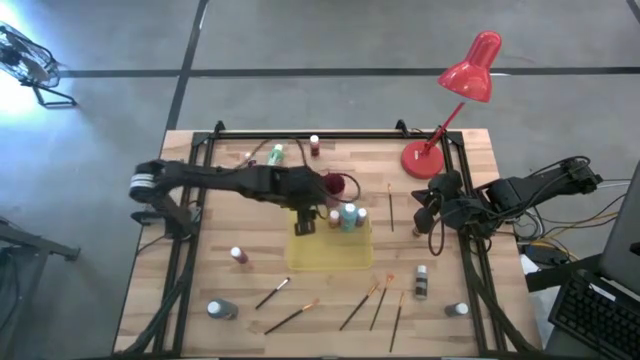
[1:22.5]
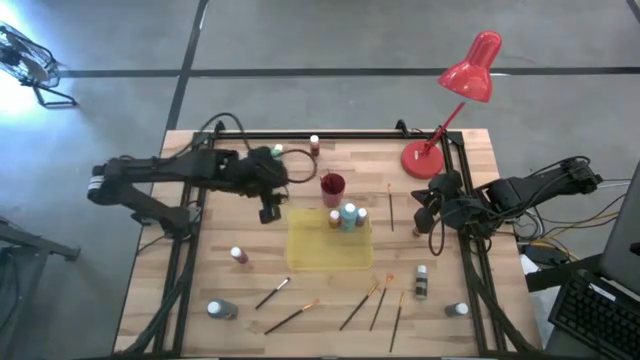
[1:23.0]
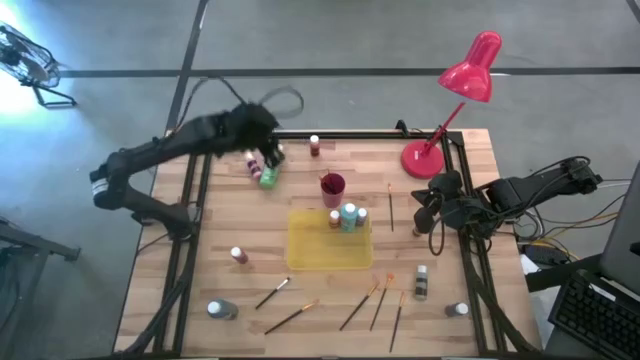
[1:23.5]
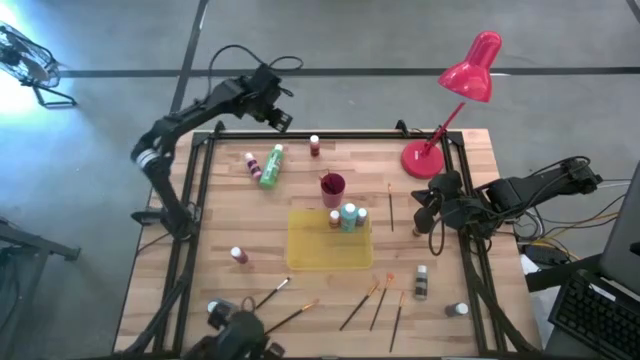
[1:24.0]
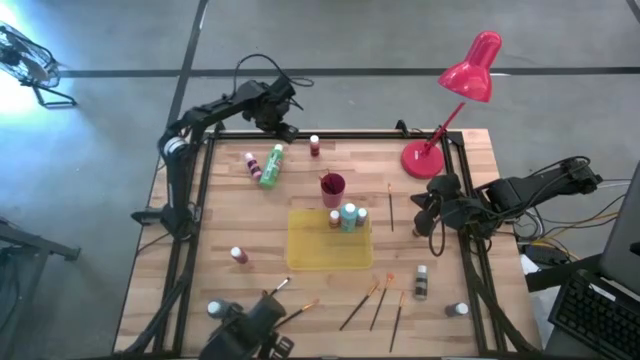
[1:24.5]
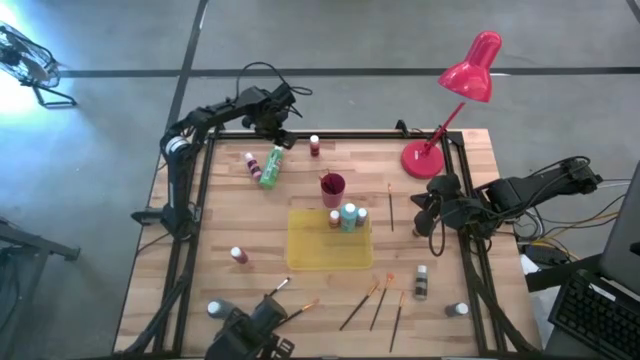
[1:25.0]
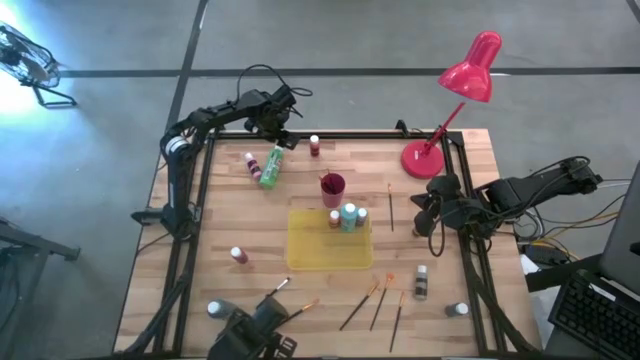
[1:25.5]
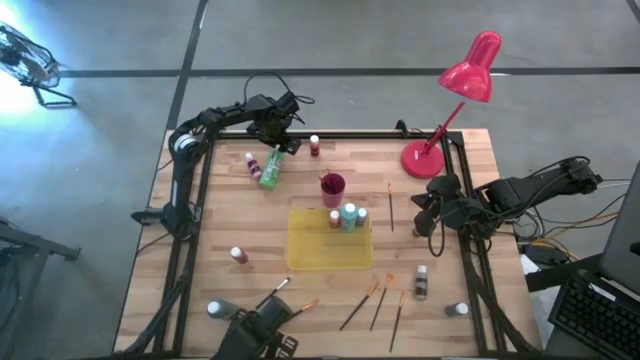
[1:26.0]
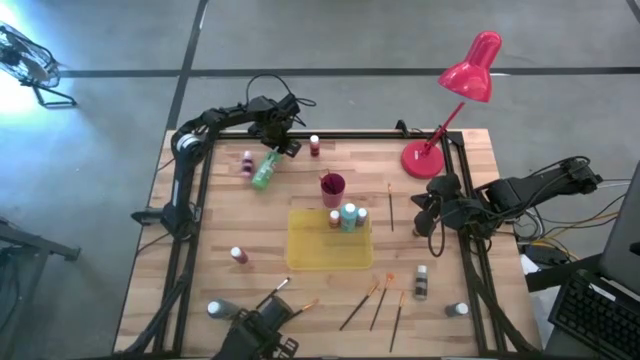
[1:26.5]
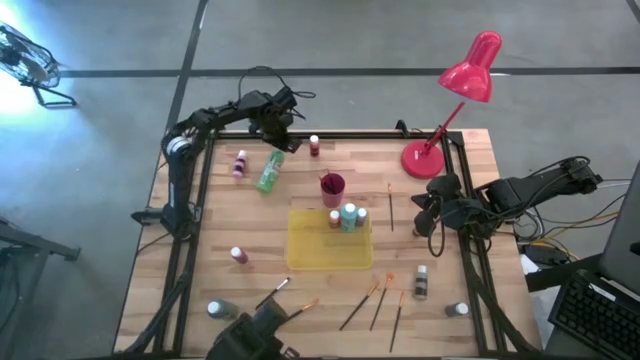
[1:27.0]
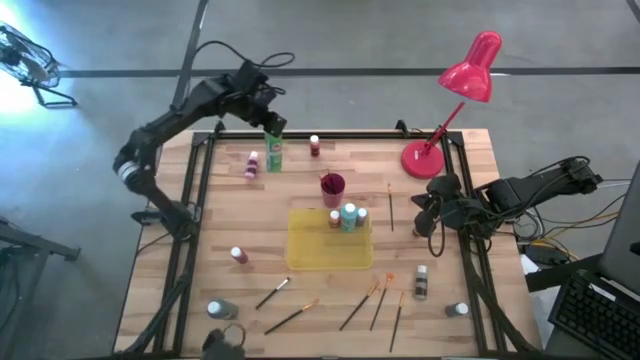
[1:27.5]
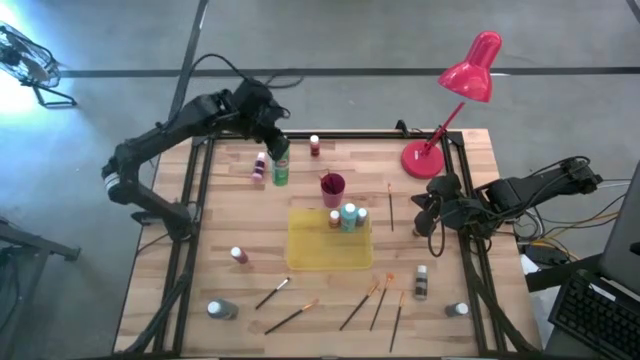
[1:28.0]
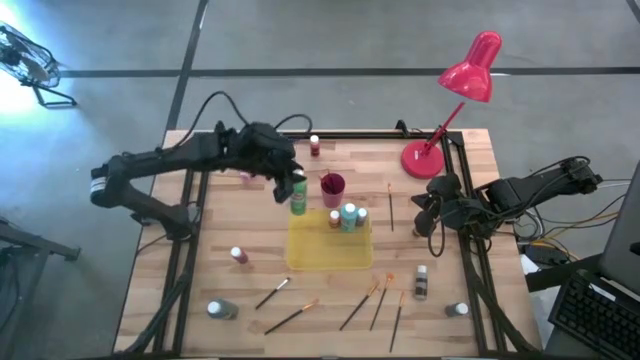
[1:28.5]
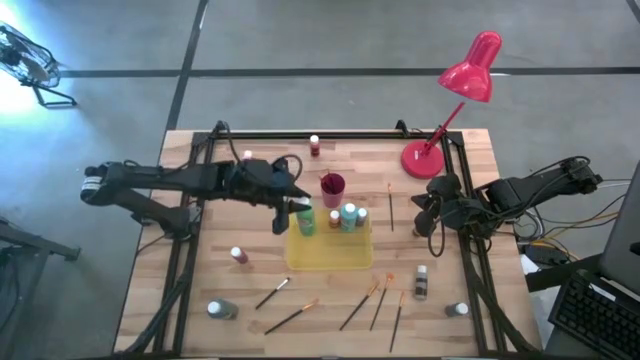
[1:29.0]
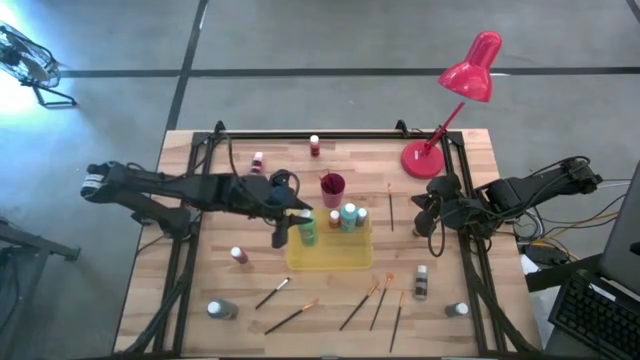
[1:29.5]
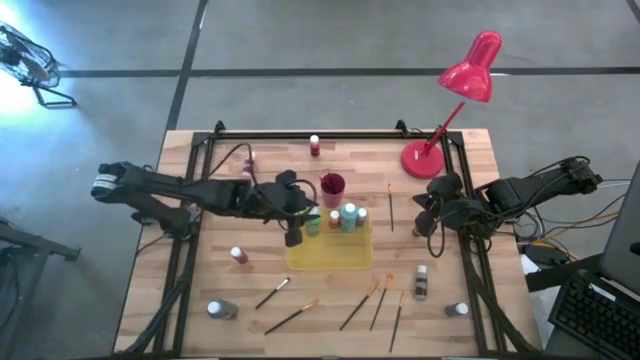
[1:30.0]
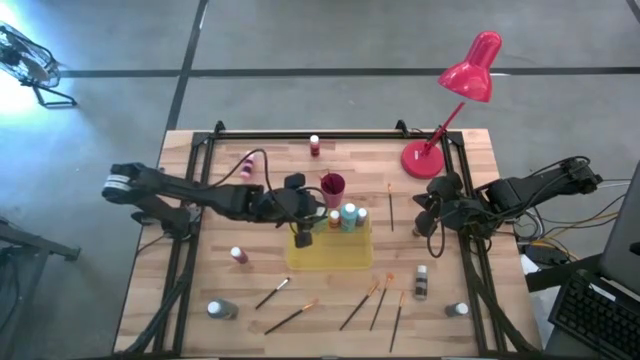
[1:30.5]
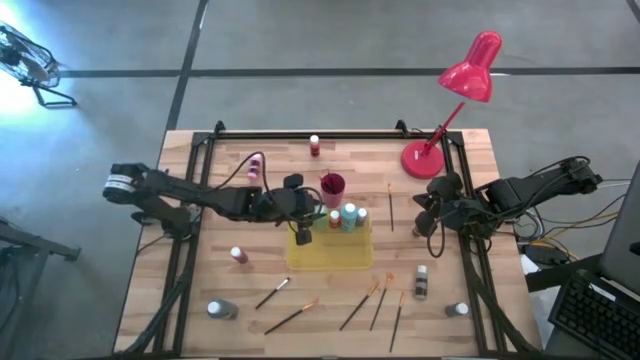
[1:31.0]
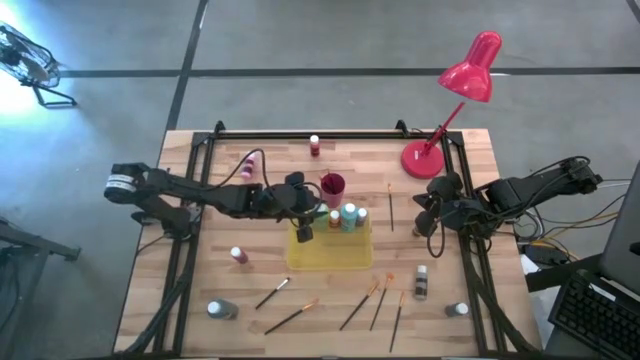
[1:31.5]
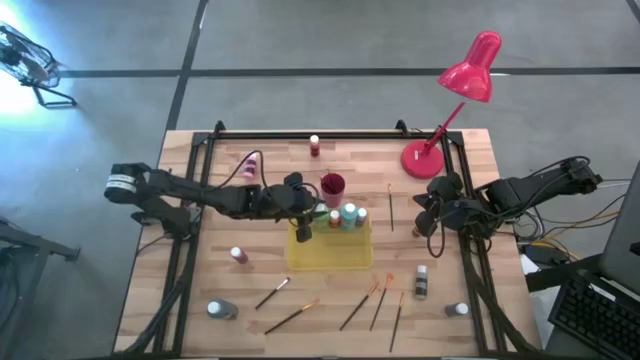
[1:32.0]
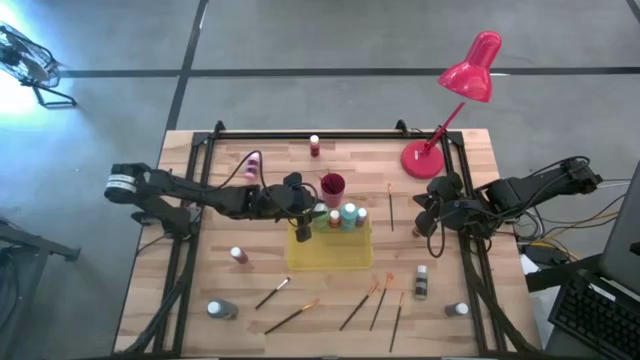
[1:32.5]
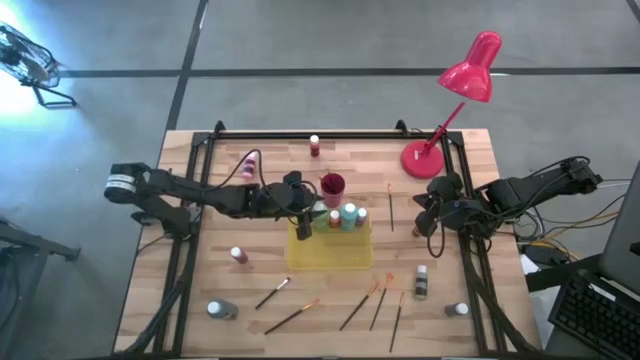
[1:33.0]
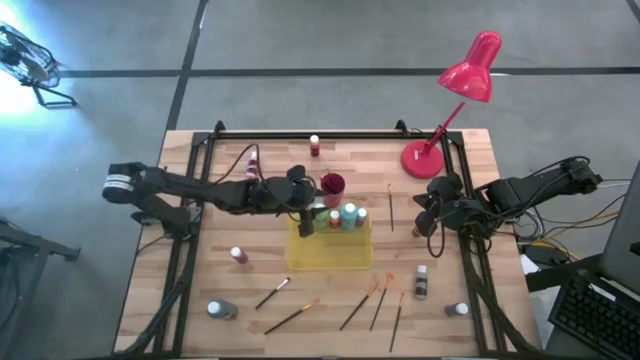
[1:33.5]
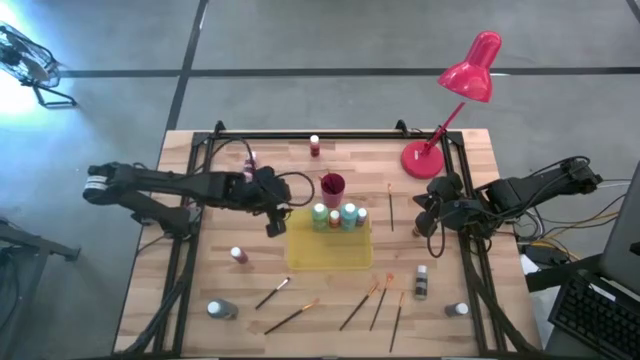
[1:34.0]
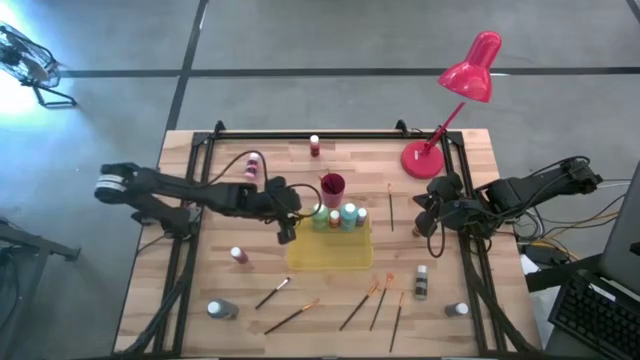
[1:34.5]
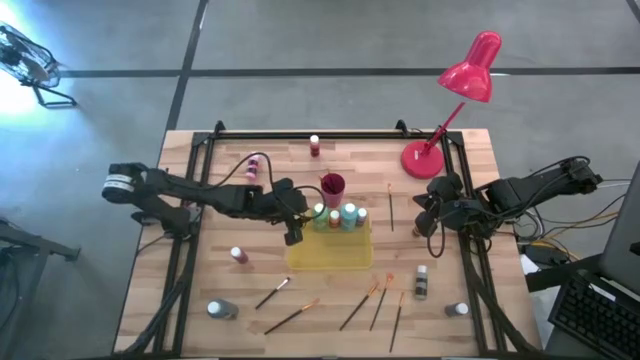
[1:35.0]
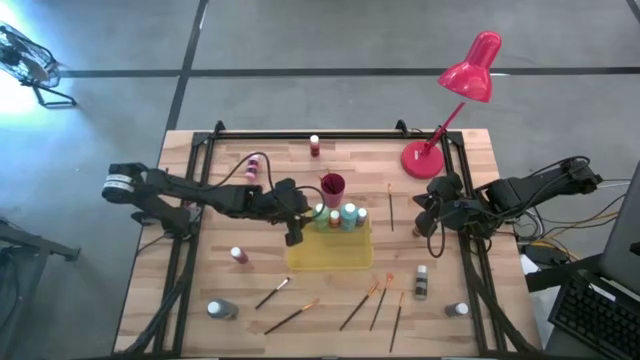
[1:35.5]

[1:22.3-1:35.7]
Task: Pick & Place Paint Supplies
Put the large green paint bottle into the yellow bin

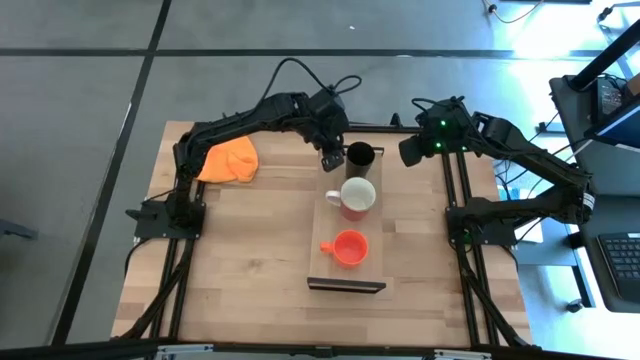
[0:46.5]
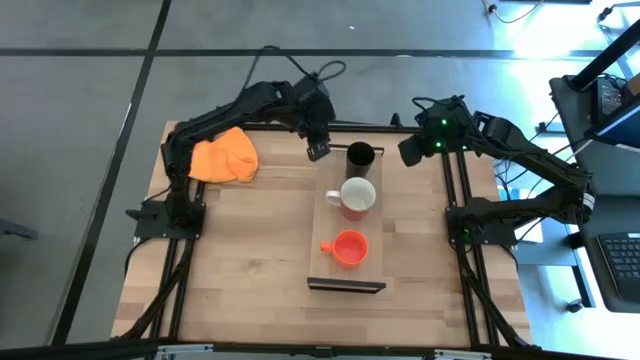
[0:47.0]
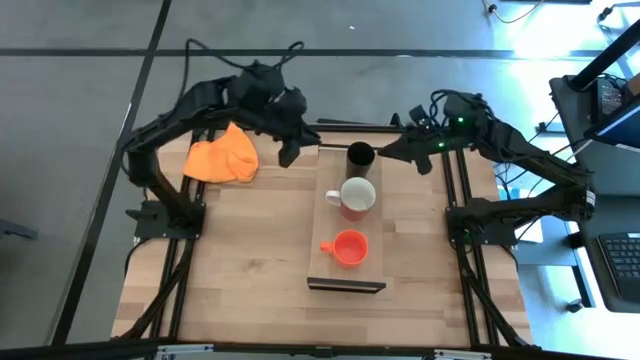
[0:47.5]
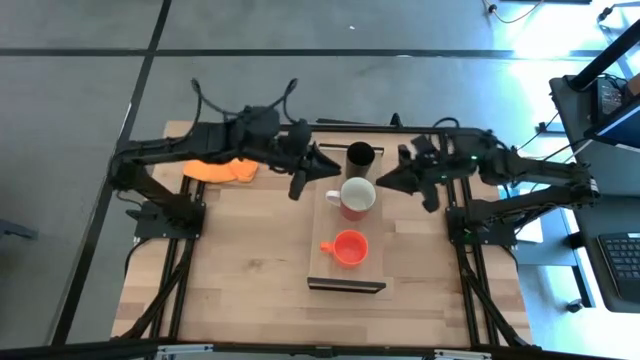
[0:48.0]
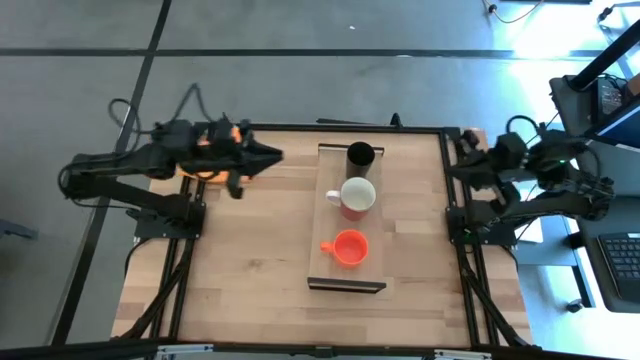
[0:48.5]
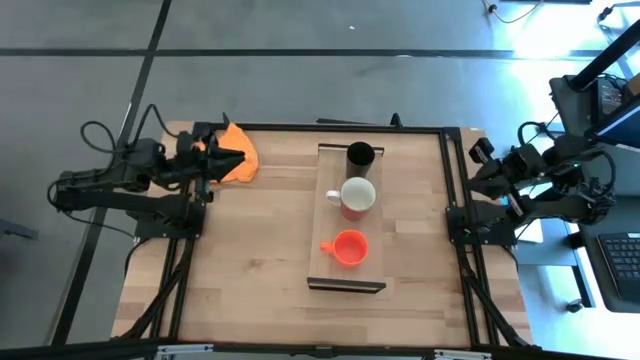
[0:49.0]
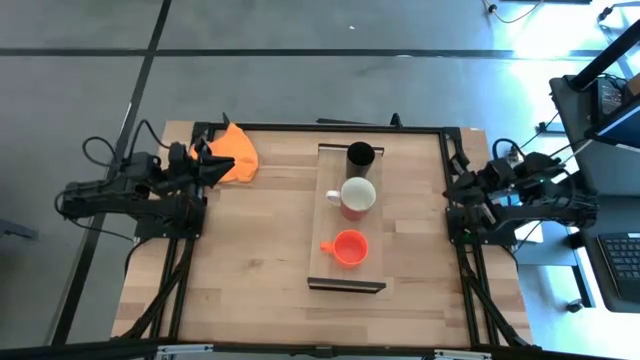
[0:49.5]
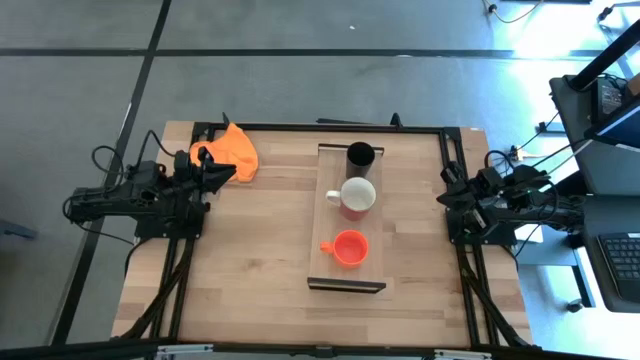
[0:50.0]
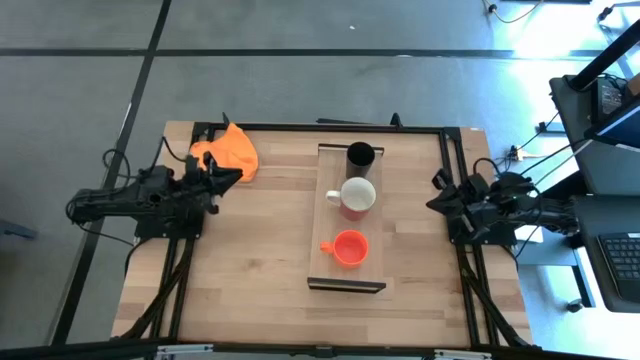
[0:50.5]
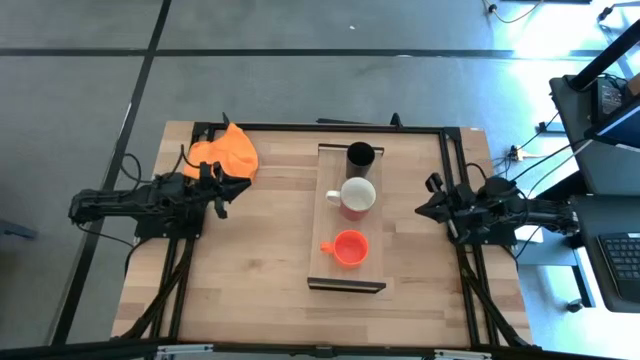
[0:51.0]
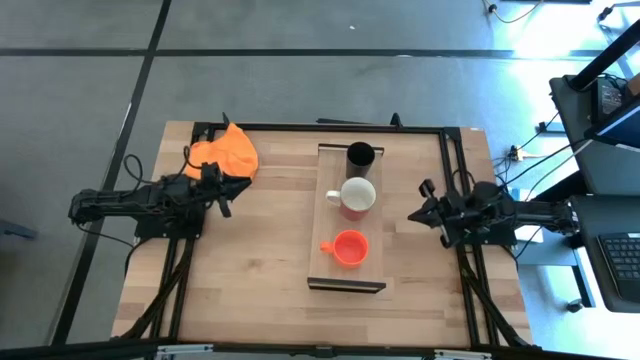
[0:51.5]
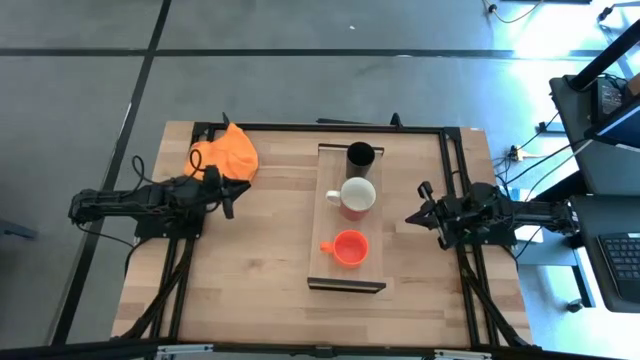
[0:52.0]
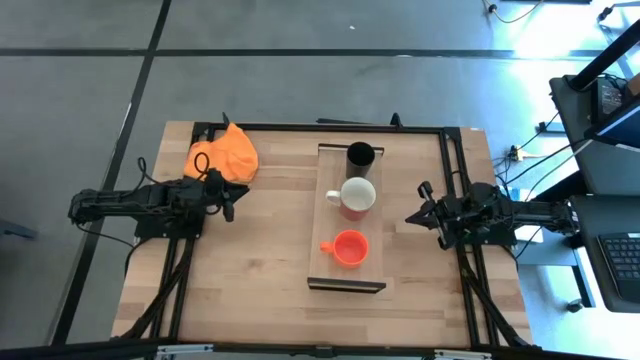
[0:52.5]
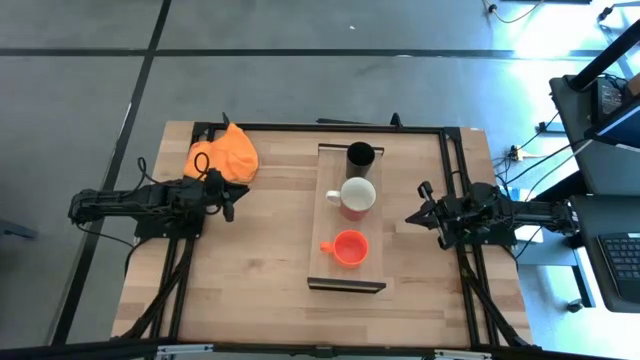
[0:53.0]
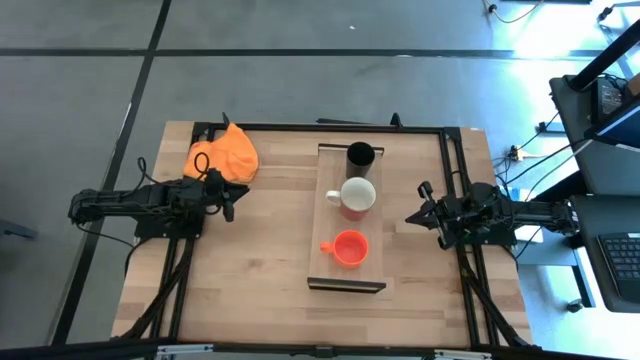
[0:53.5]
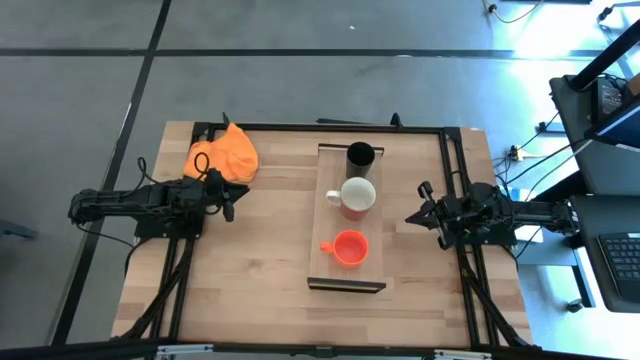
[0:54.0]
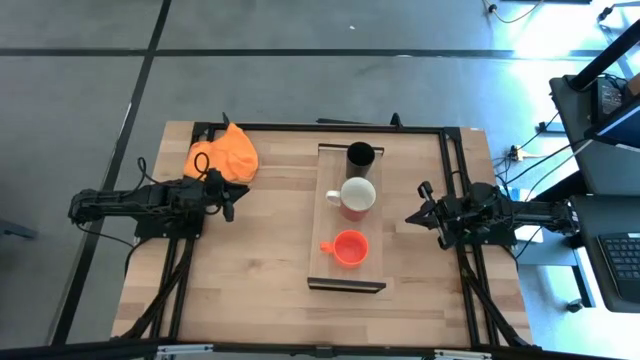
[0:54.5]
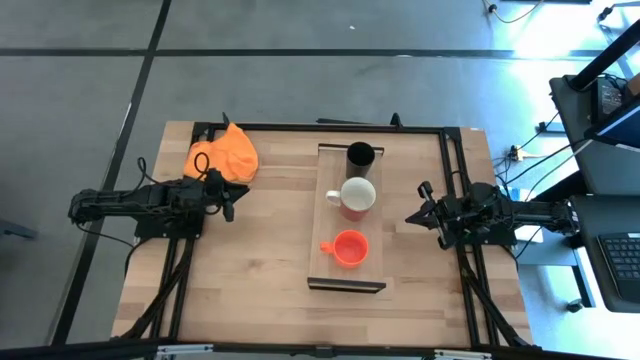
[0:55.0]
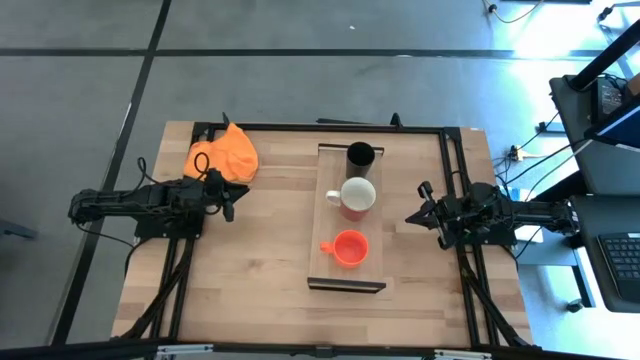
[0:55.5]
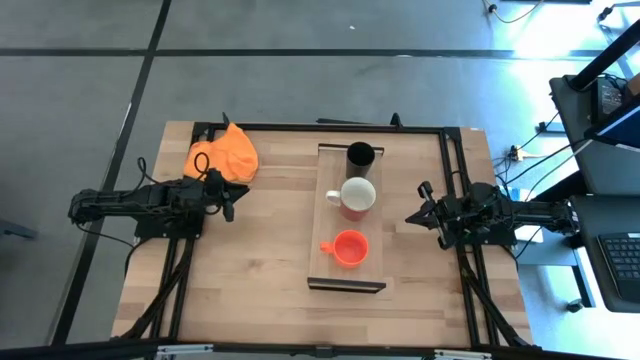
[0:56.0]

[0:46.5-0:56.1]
Task: Stack small to large cups/mugs on shelf
Return to Home Position
